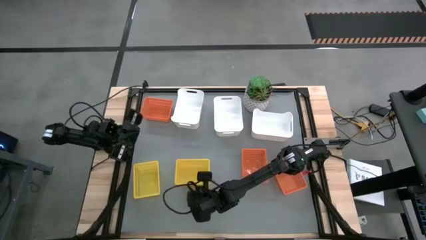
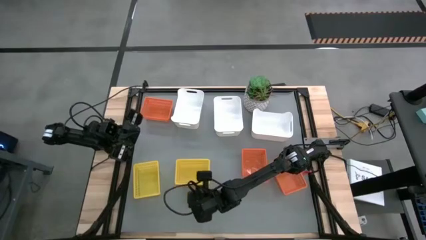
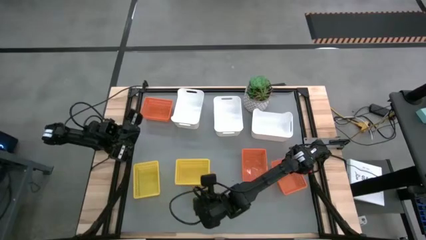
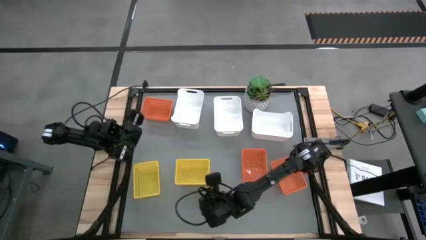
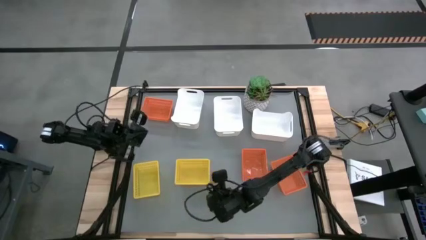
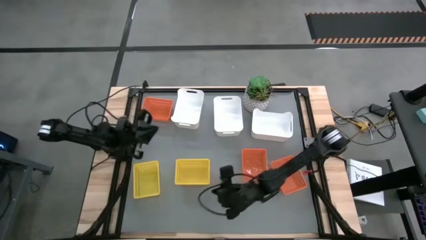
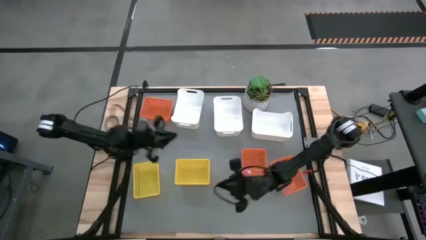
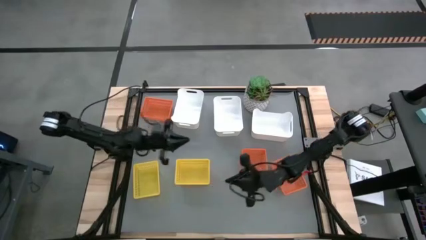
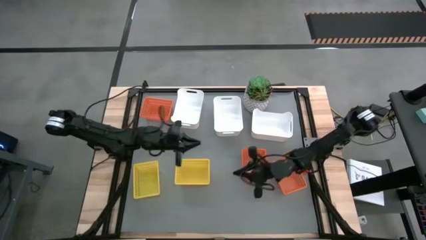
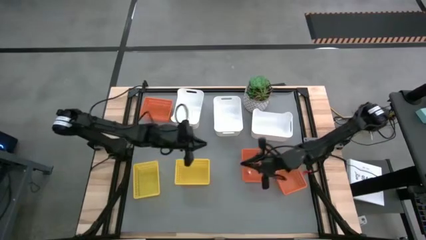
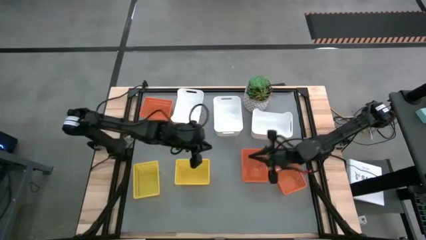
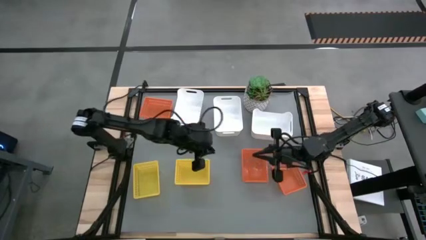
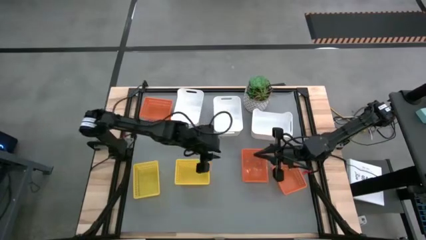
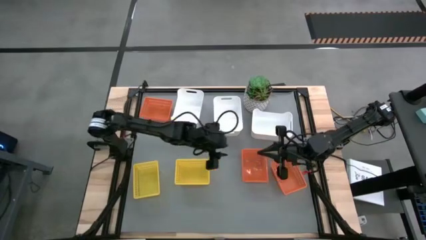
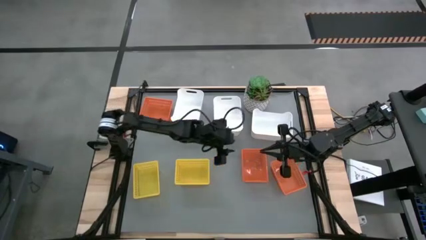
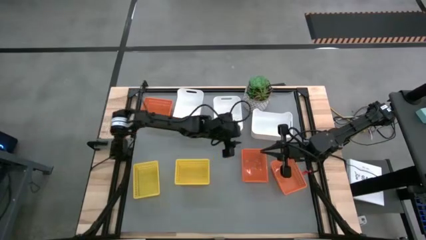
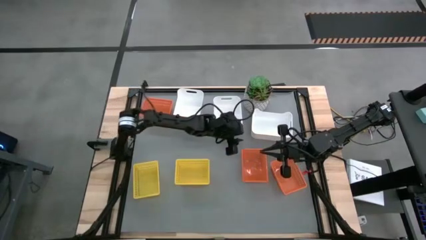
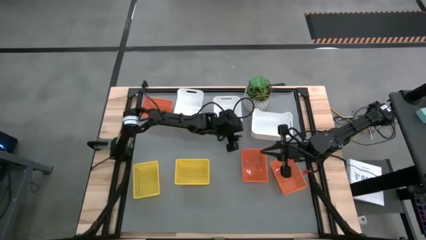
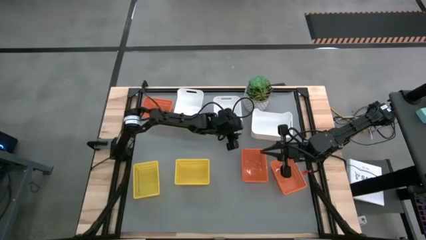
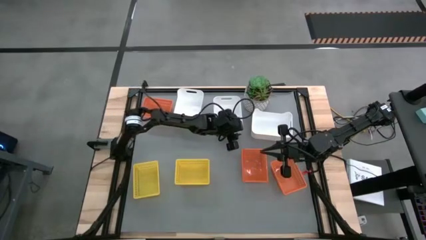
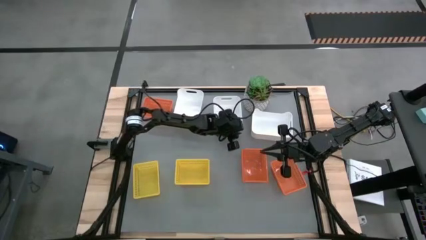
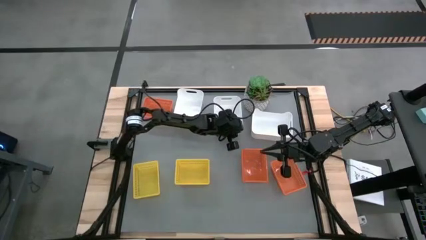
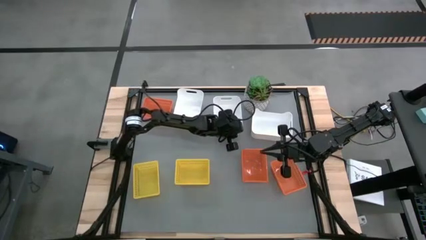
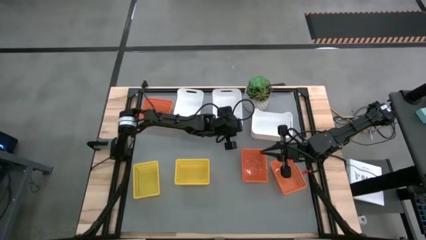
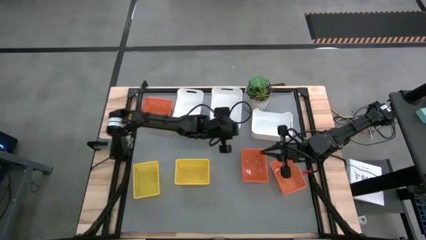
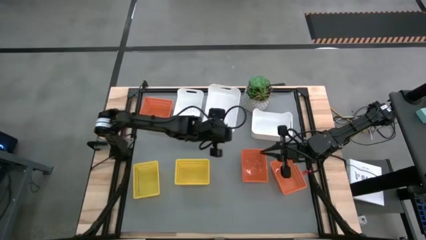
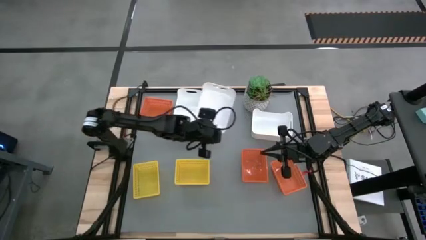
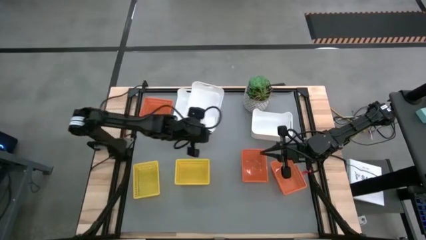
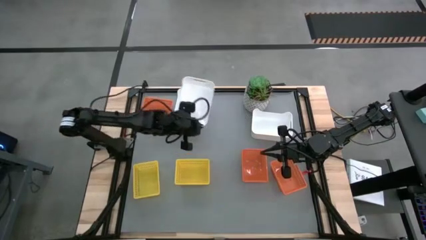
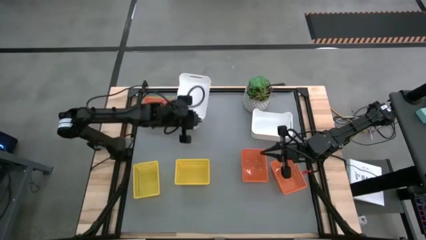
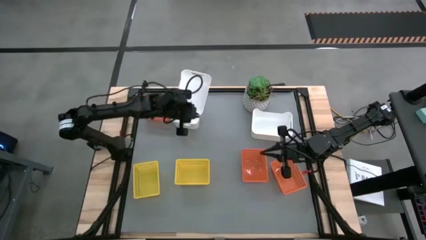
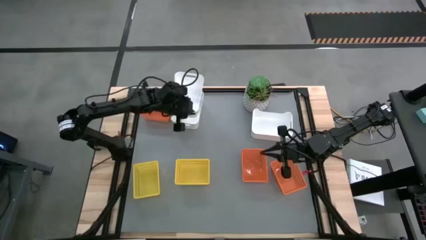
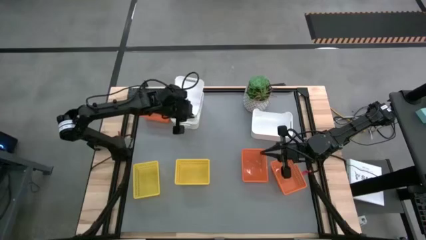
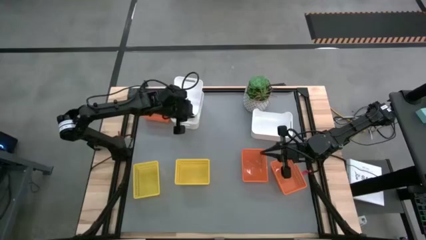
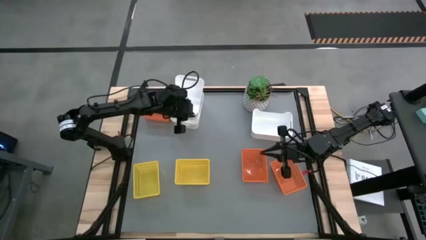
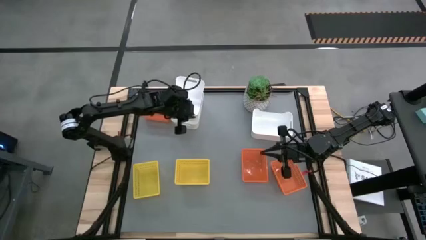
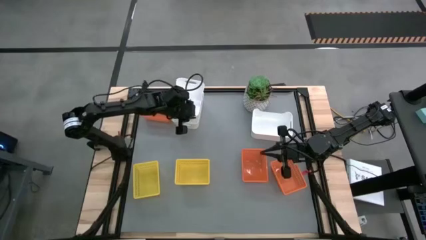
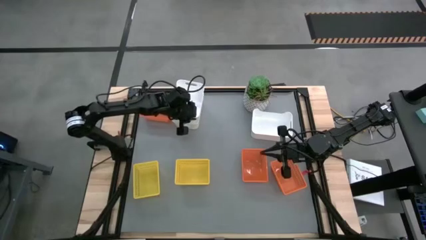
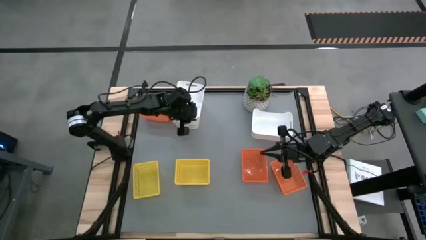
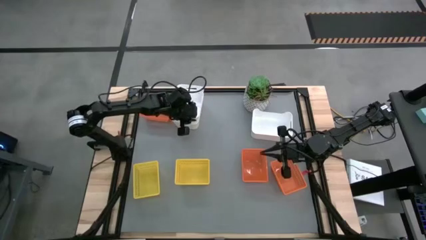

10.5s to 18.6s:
Stack the middle white bin on the left white bin

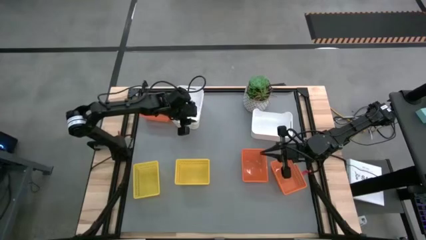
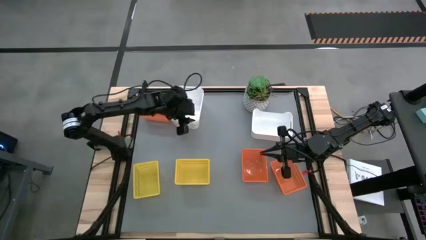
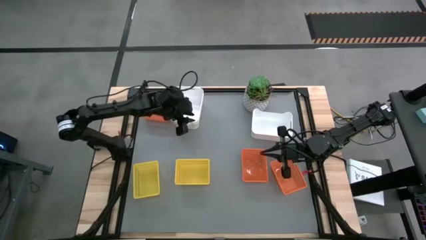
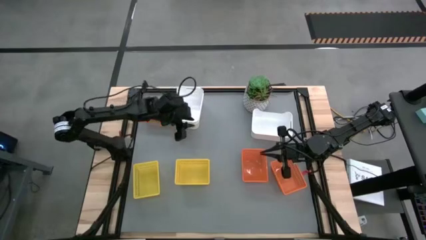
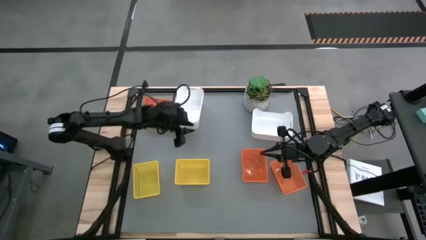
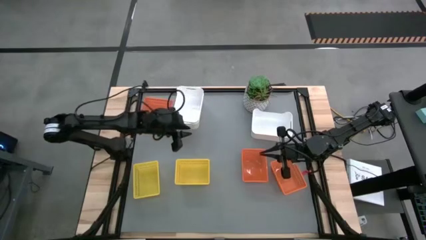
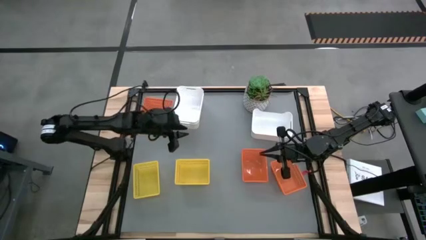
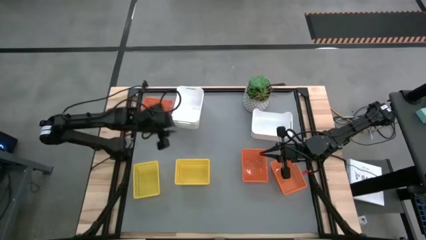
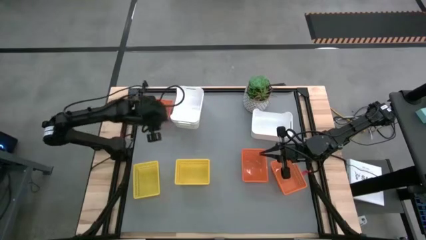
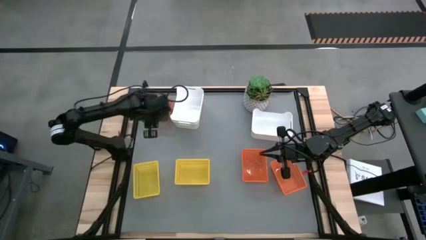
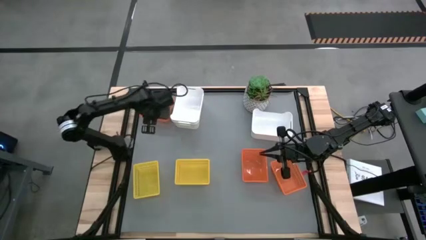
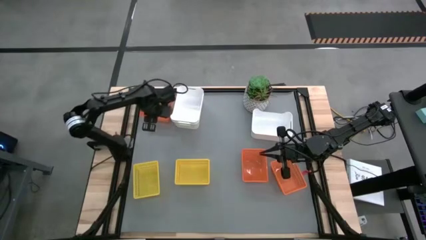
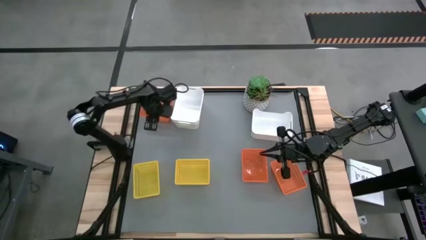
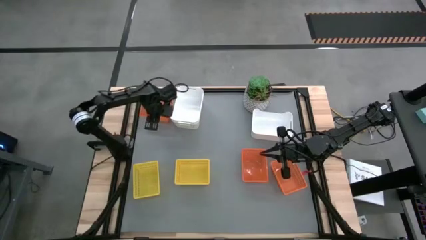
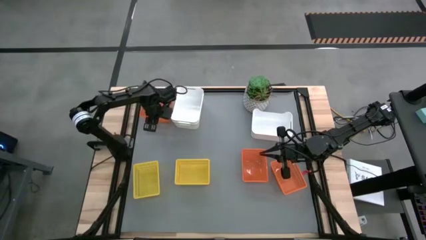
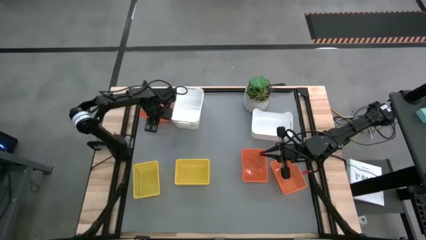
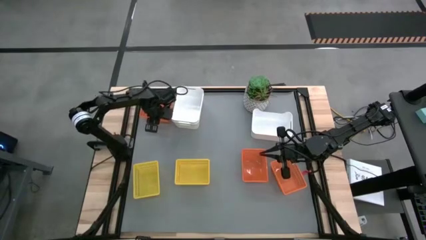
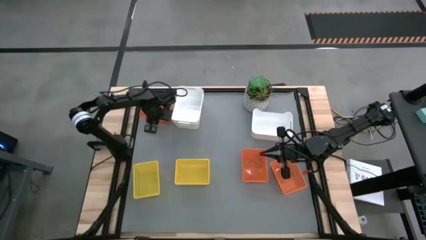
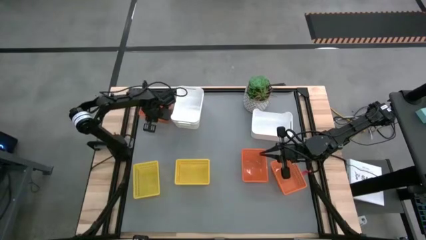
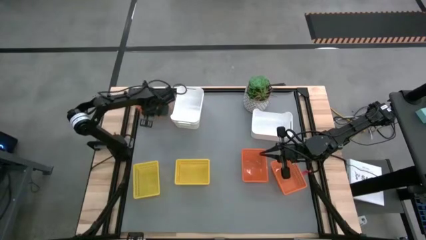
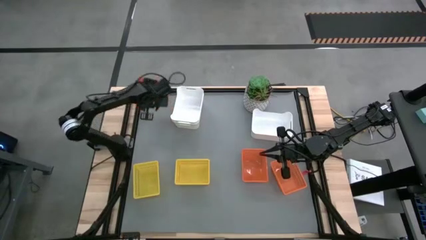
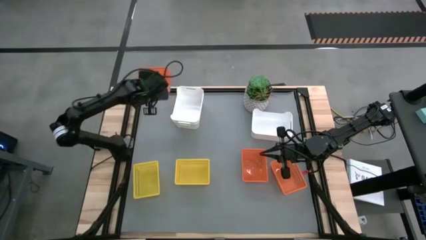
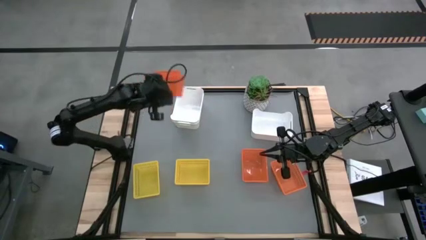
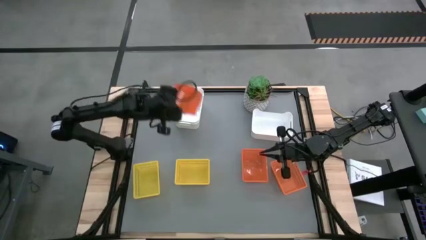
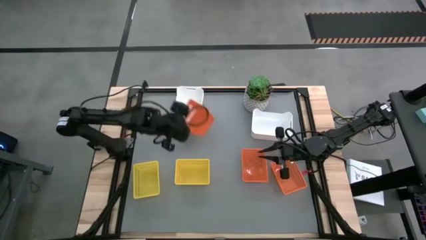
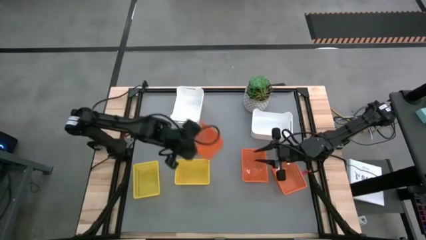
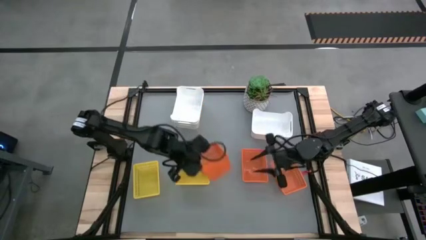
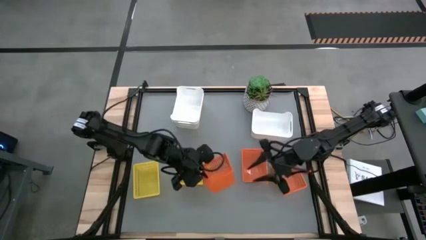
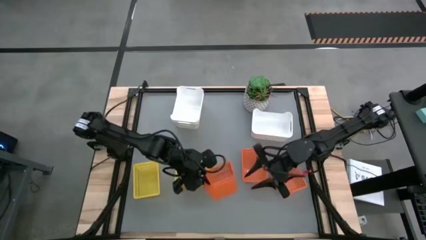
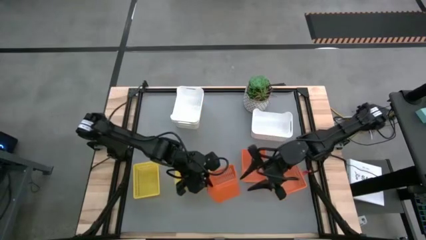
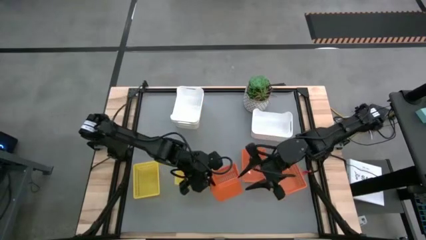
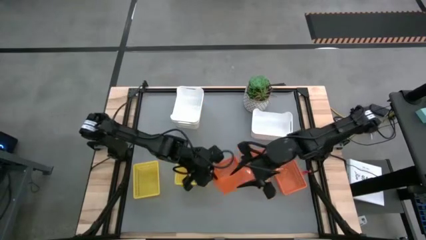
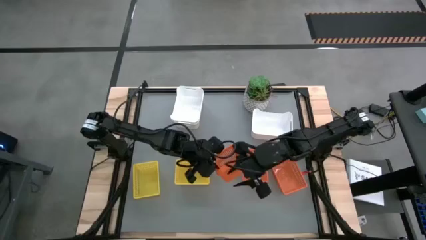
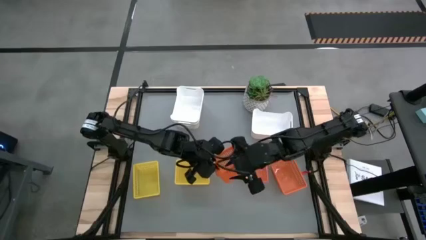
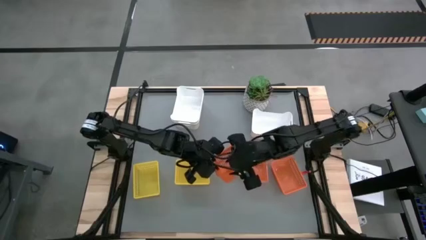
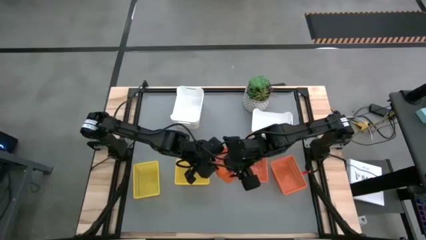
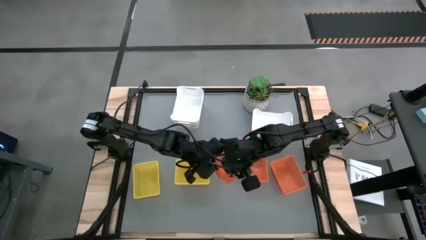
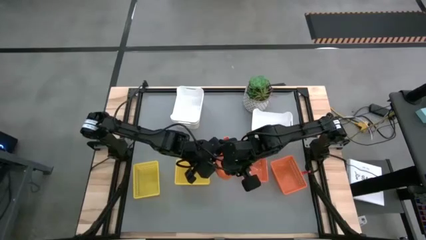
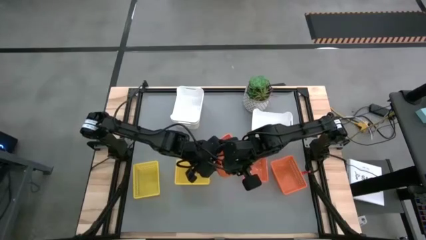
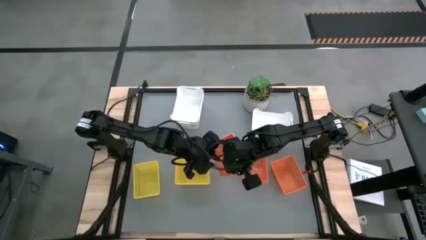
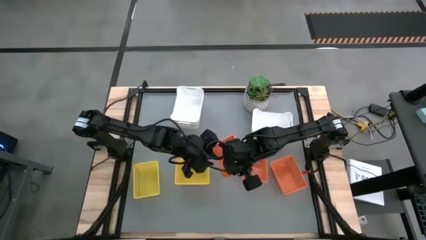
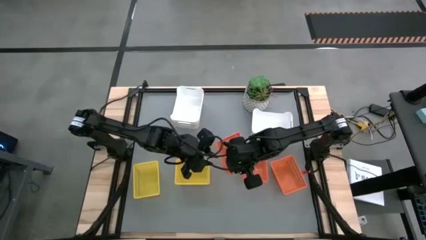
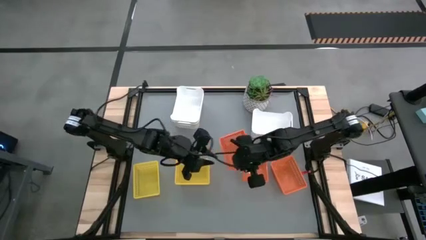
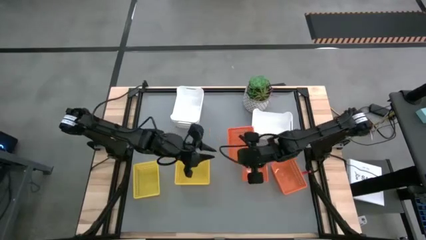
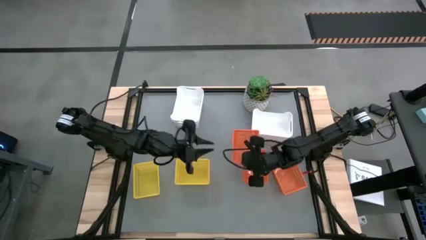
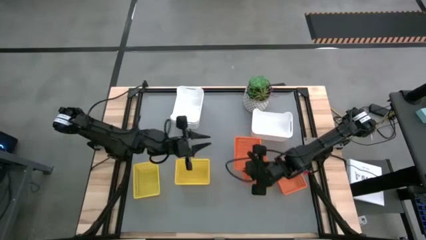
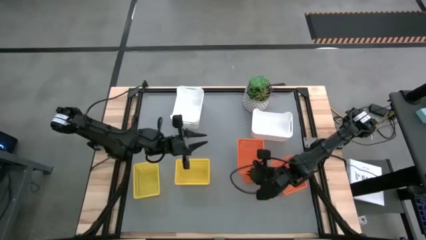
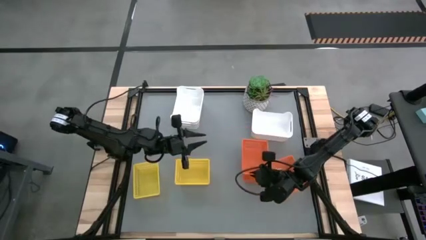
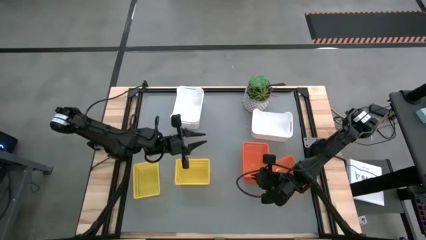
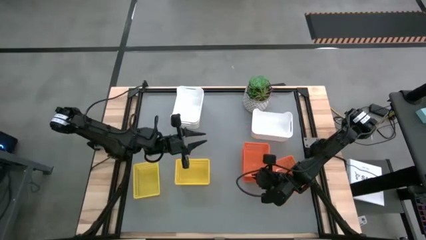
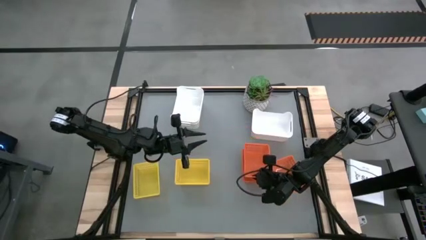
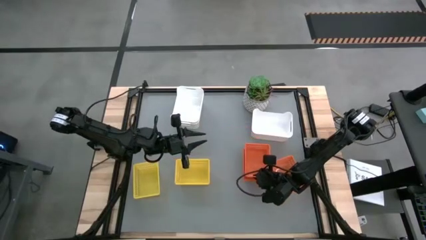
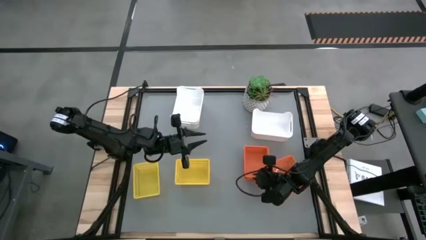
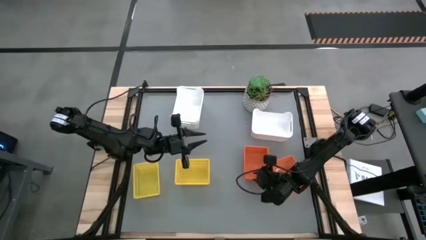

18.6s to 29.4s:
Stack the top orange bin on the middle orange bin
